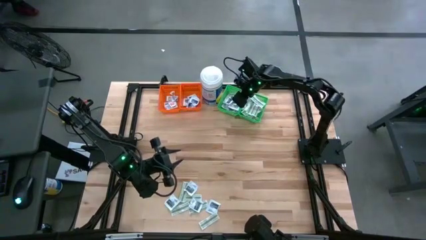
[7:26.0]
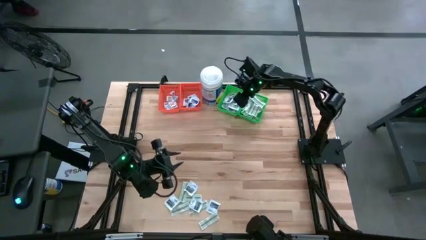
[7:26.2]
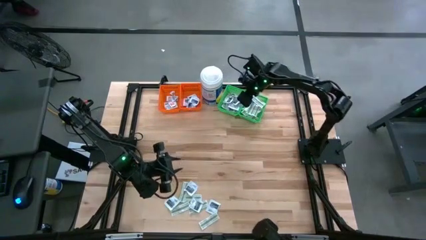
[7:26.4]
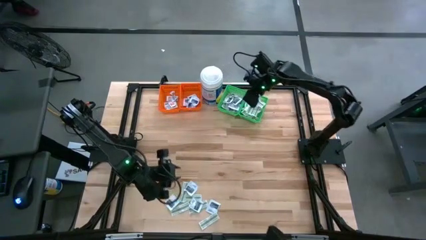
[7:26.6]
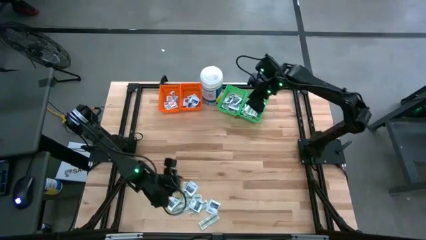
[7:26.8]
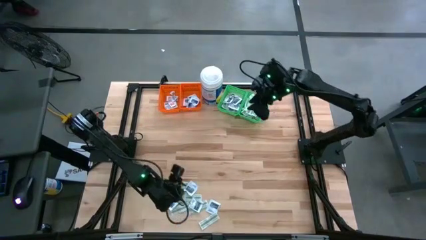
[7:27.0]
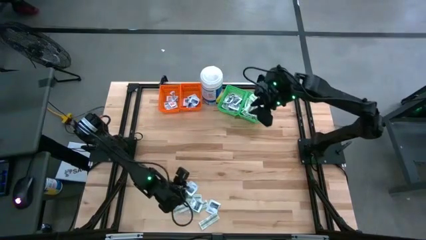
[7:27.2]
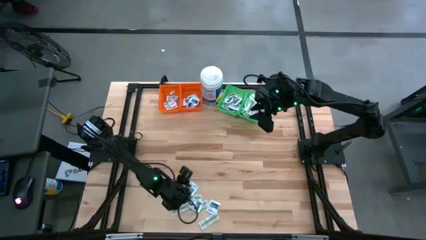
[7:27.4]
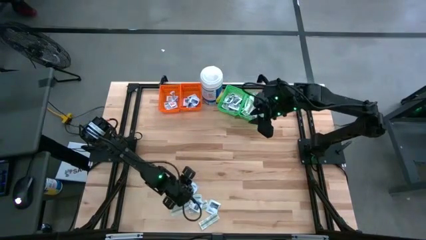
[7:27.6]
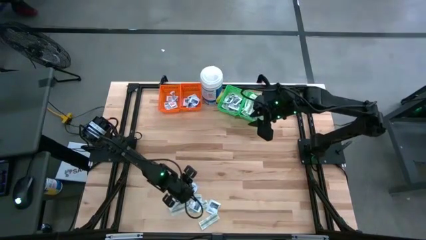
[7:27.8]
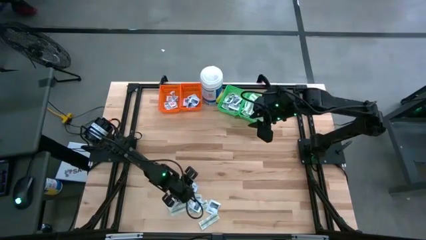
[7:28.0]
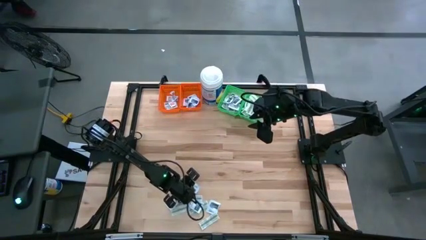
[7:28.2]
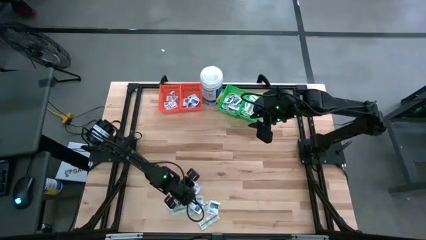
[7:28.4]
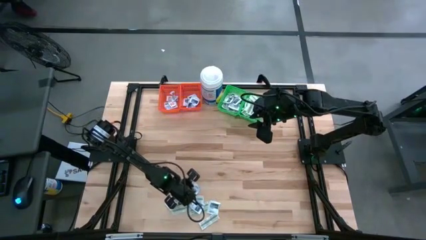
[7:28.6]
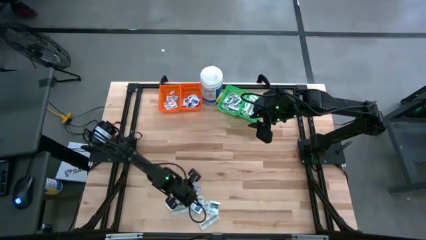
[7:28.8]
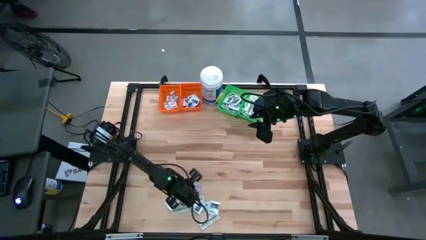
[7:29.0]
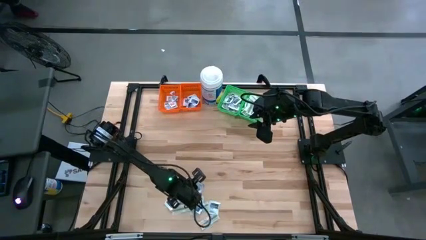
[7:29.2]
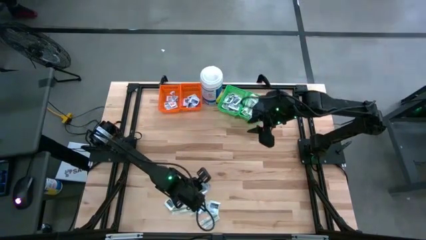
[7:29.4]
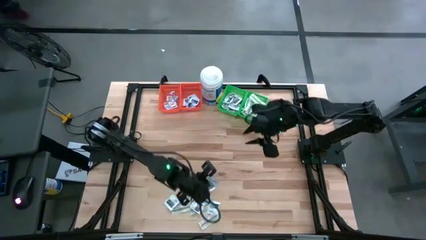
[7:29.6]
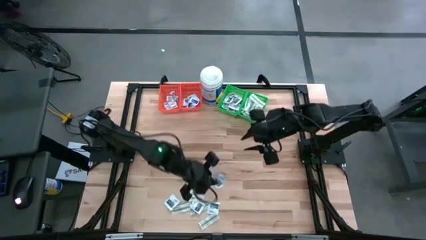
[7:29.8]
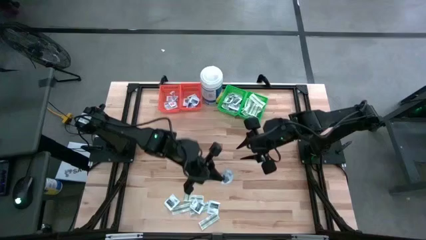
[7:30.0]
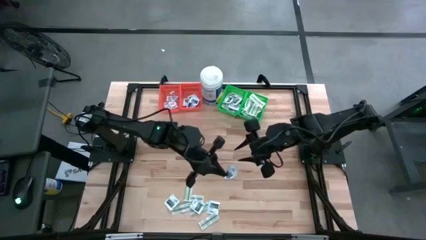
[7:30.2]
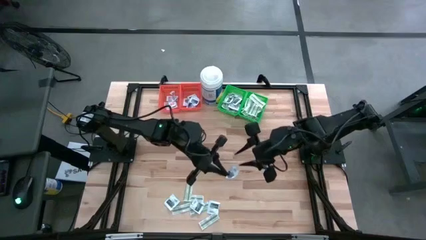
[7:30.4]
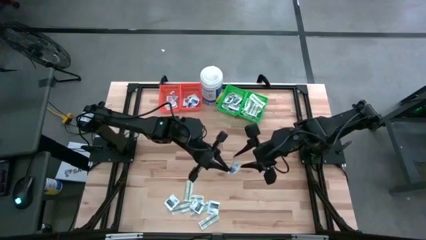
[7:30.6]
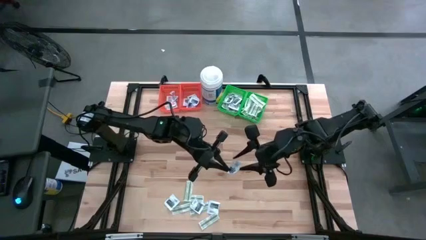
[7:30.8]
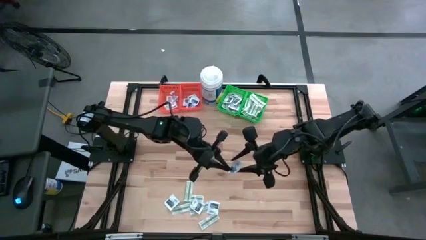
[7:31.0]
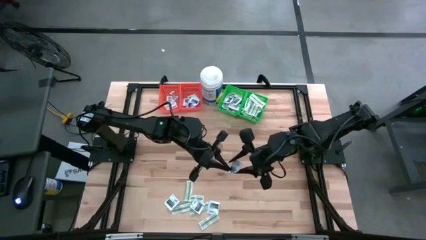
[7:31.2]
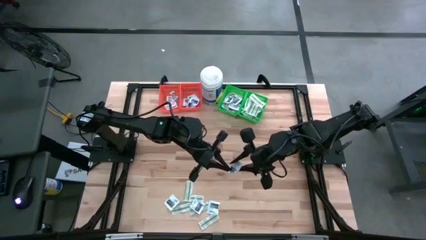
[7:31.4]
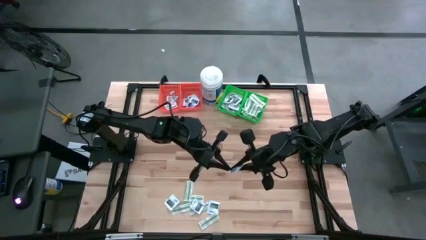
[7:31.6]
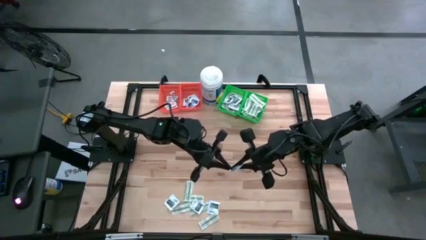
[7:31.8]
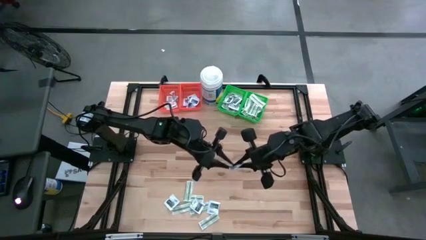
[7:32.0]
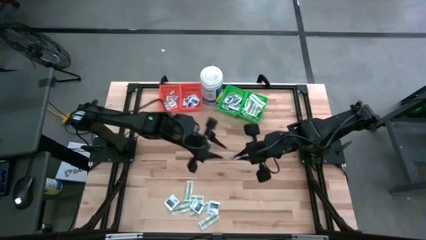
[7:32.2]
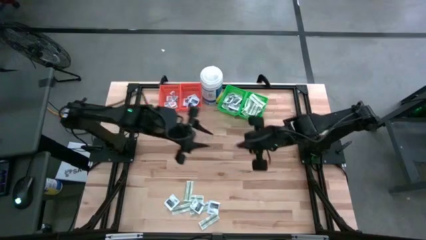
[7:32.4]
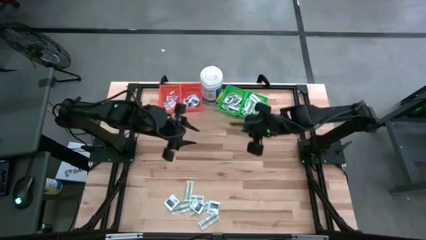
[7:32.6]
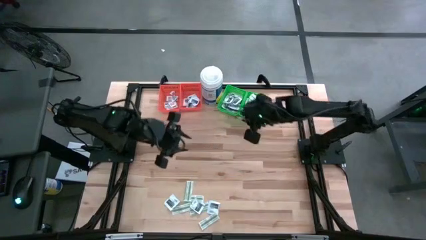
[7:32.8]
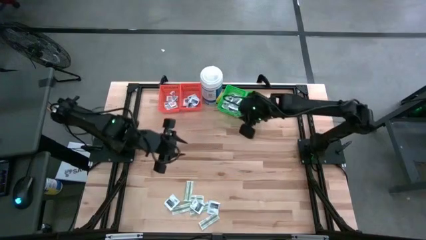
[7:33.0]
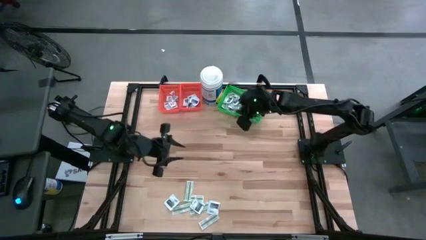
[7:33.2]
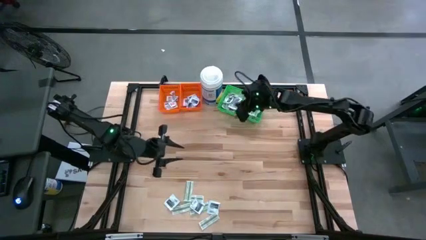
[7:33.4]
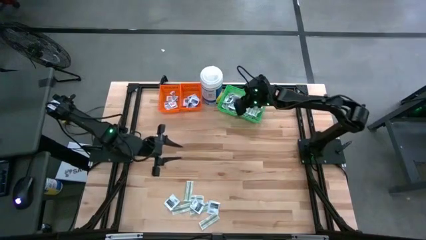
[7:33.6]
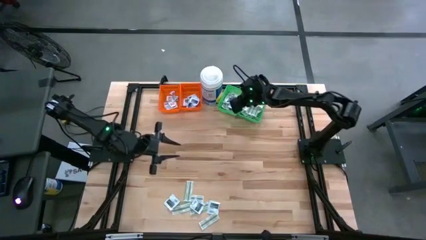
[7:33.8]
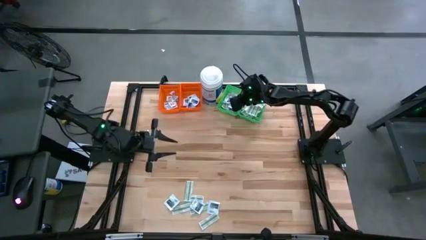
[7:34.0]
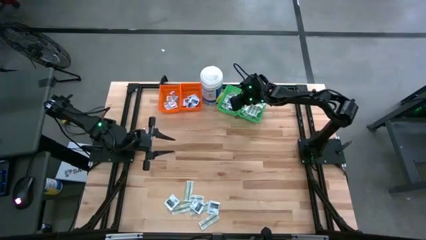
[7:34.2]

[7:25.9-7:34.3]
Task: Pick & Place First Aid Supplies
Put the black towelette pack into the left green bin

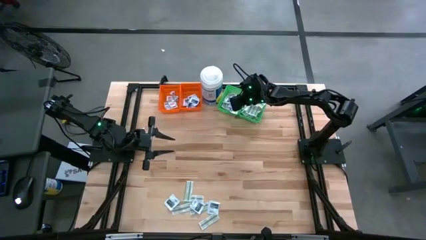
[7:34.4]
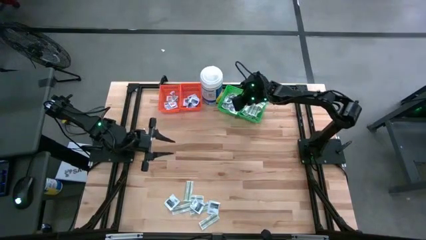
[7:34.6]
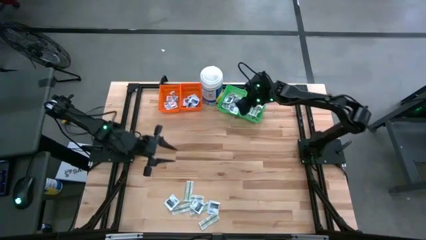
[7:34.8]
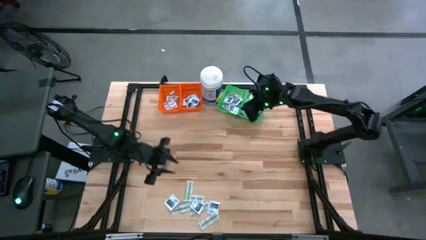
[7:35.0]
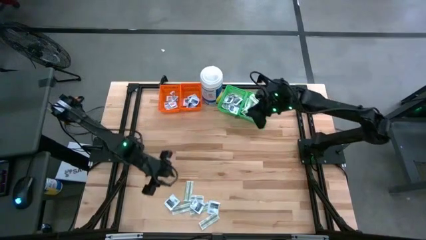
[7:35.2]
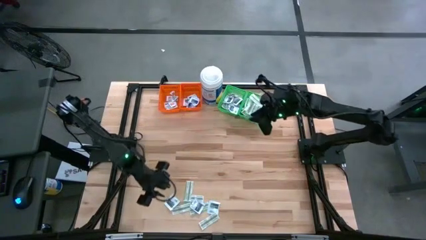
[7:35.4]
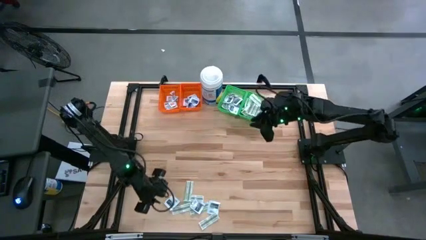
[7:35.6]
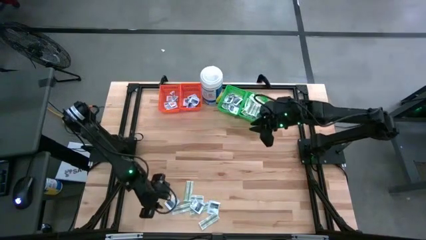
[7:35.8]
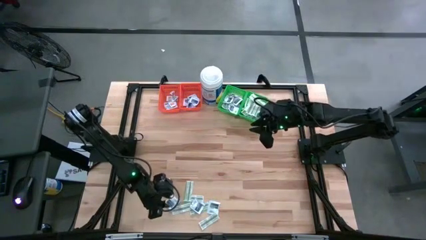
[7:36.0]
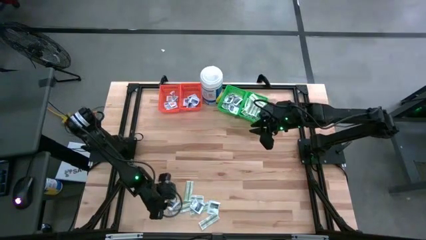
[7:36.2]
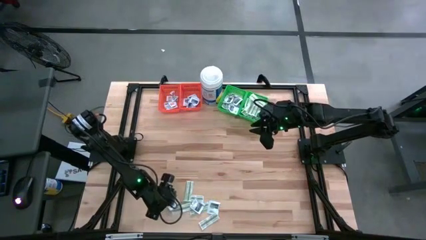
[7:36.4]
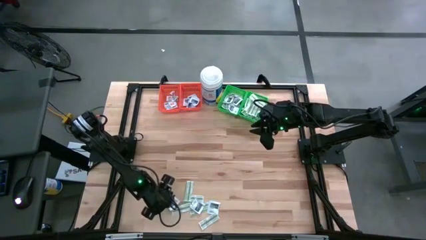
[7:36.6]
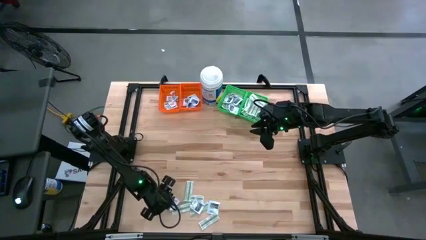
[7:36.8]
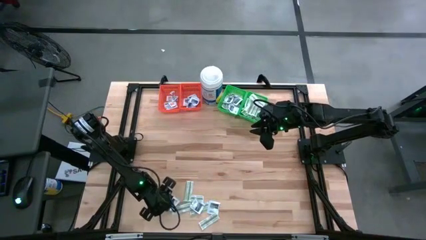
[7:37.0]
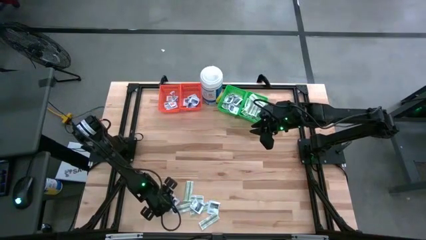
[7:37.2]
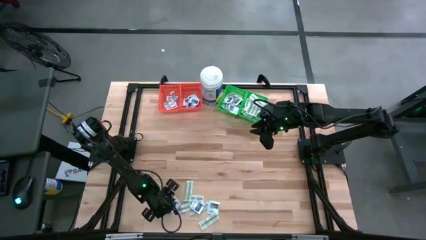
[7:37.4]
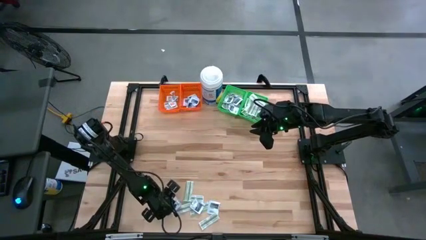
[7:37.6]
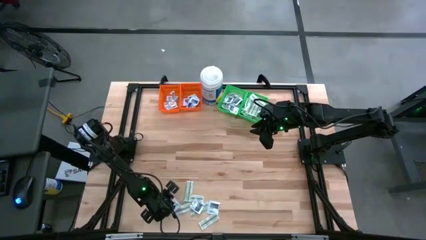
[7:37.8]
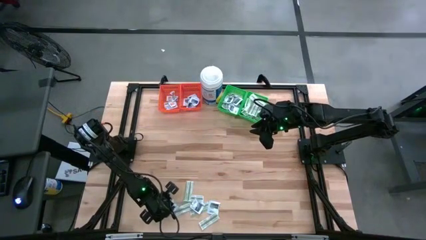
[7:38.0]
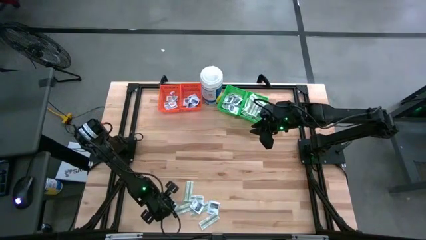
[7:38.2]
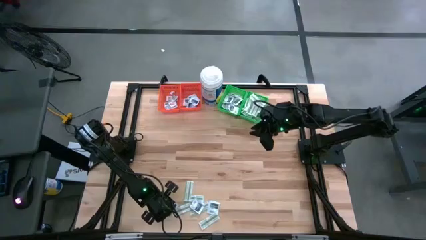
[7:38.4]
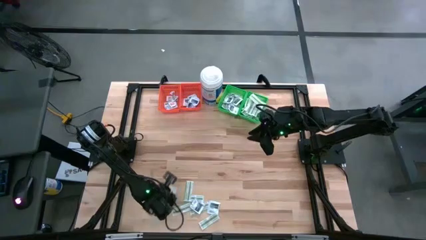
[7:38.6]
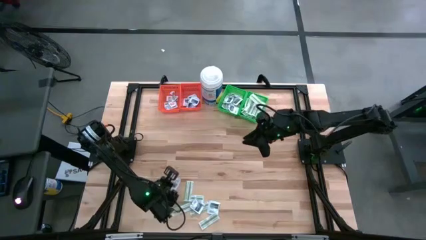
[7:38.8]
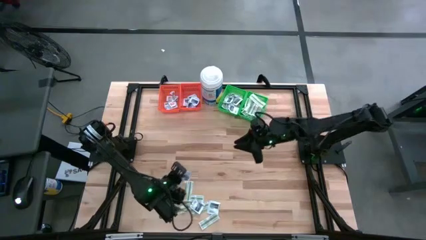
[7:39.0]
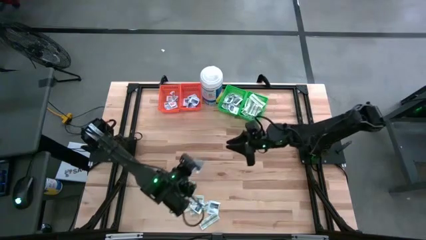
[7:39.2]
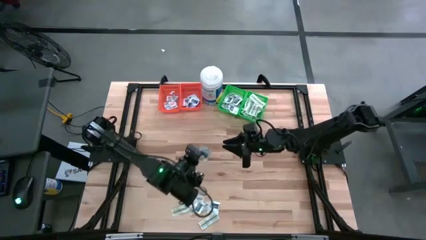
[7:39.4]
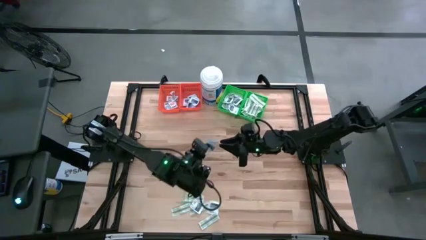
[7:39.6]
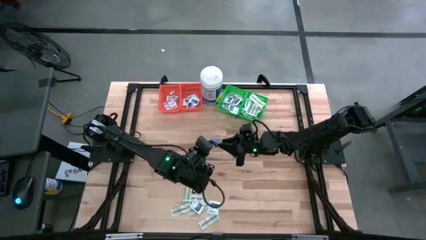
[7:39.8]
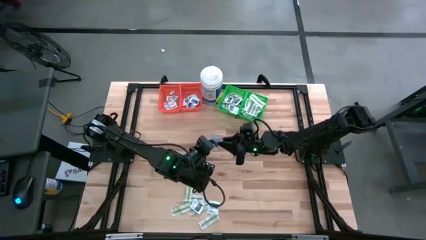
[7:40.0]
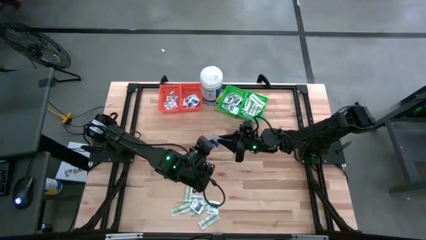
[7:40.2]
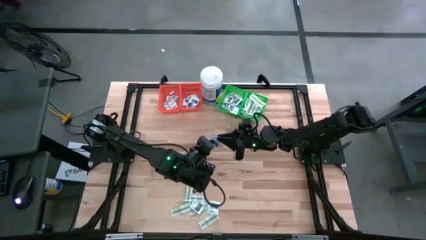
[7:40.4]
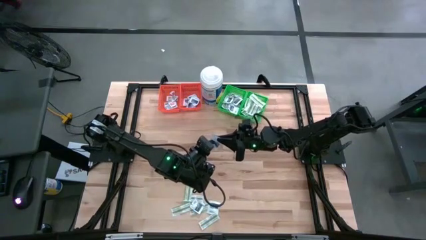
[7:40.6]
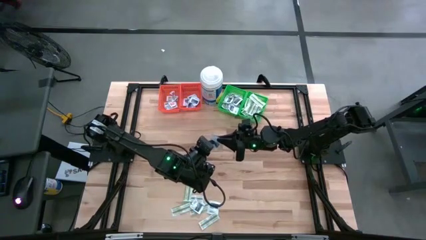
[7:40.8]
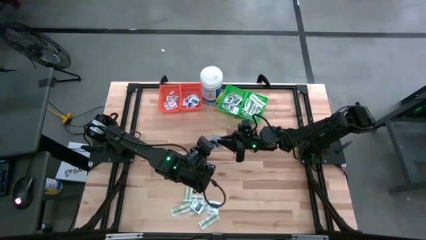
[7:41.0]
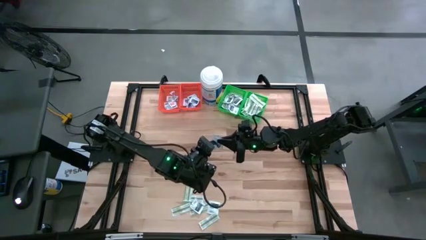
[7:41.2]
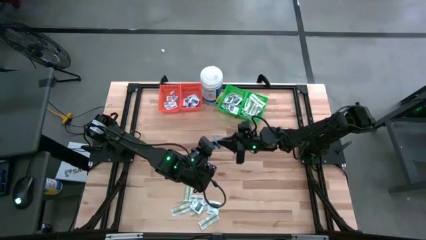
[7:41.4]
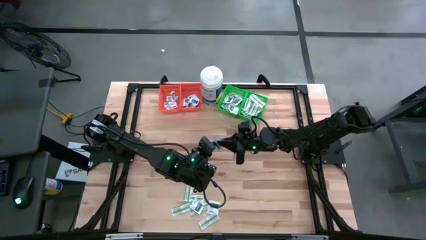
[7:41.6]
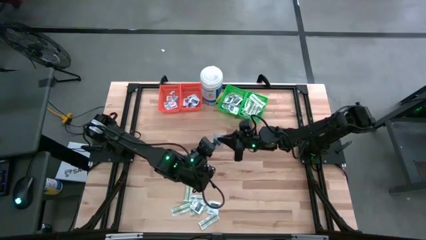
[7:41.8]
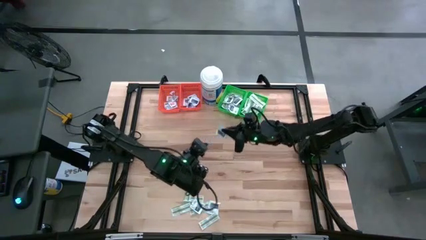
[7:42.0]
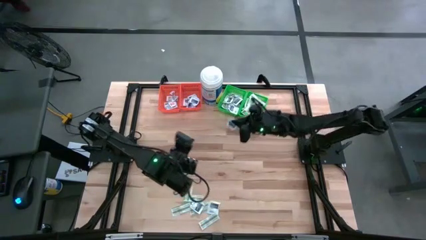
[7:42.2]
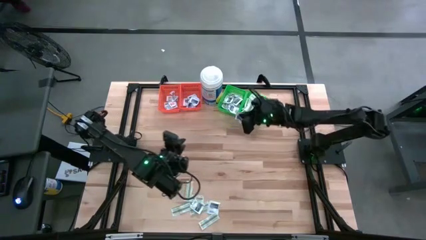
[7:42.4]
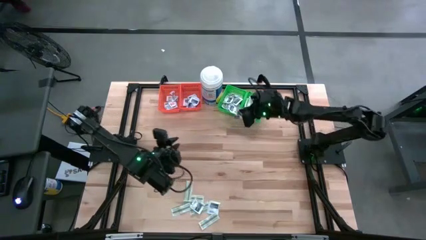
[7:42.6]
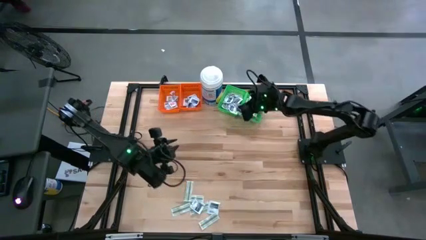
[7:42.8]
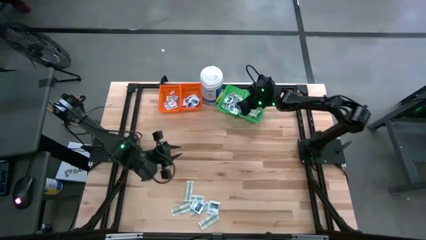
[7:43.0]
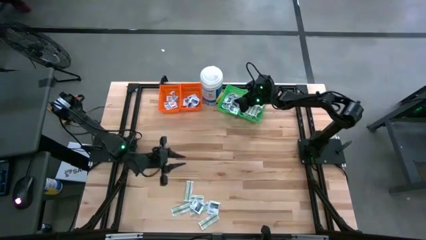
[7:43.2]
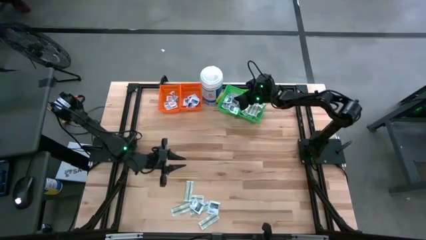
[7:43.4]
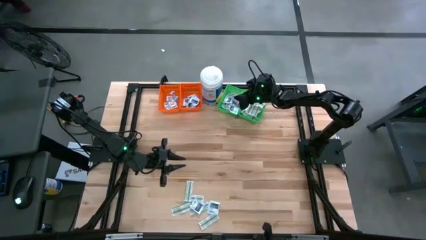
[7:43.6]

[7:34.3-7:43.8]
Put the black towelette pack into the left green bin
